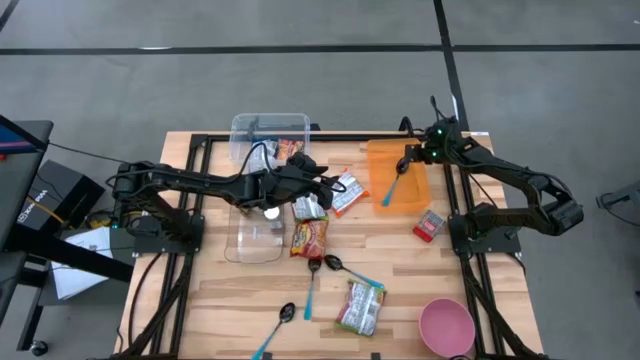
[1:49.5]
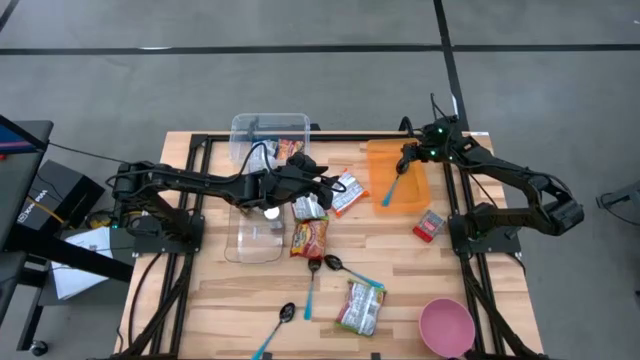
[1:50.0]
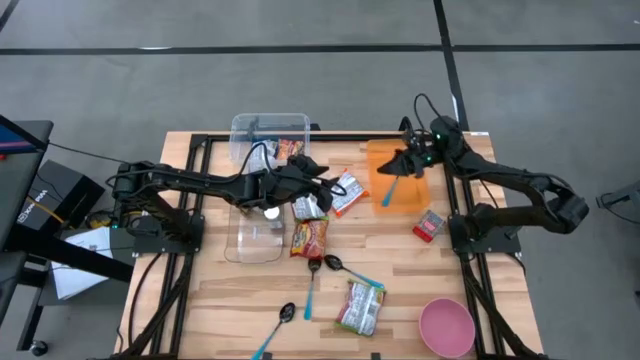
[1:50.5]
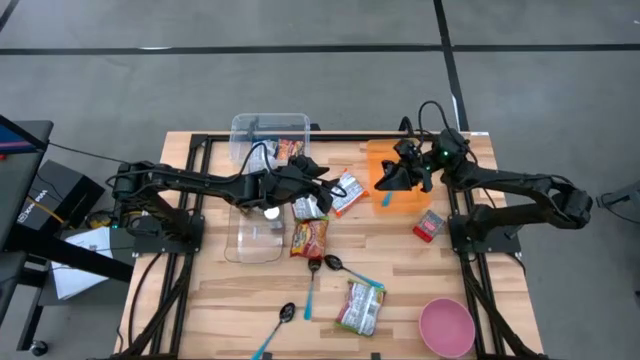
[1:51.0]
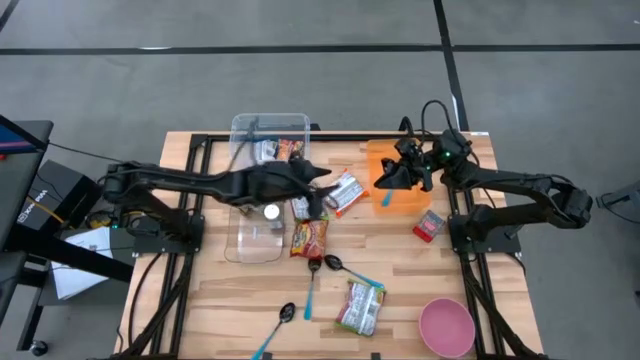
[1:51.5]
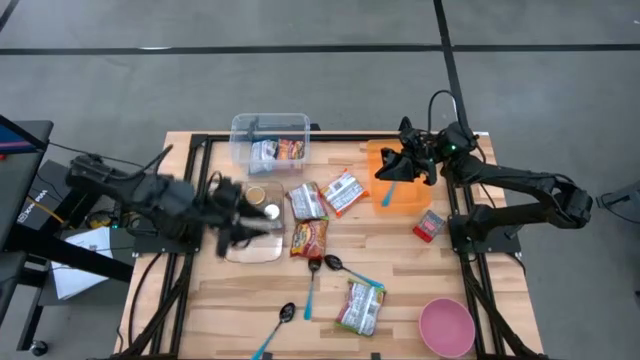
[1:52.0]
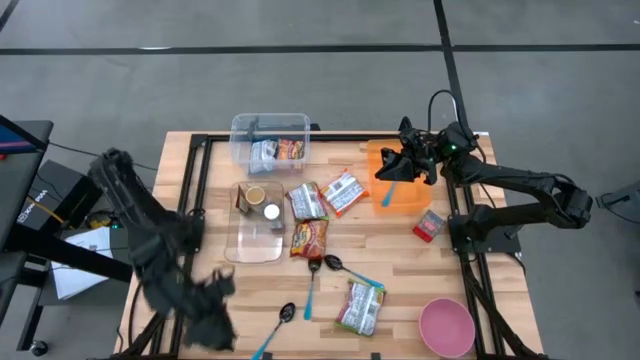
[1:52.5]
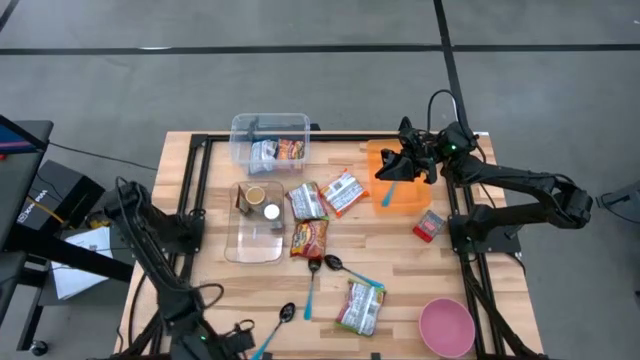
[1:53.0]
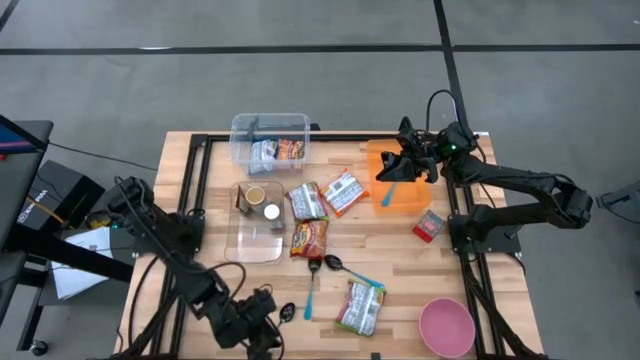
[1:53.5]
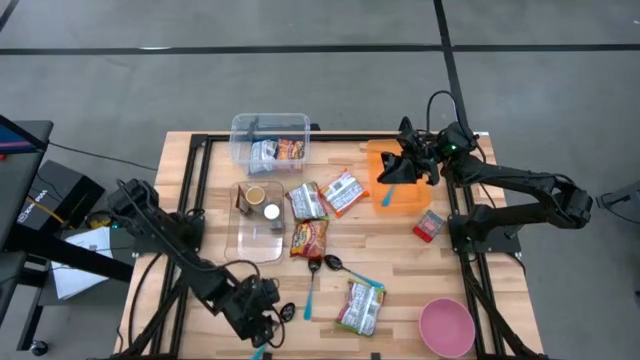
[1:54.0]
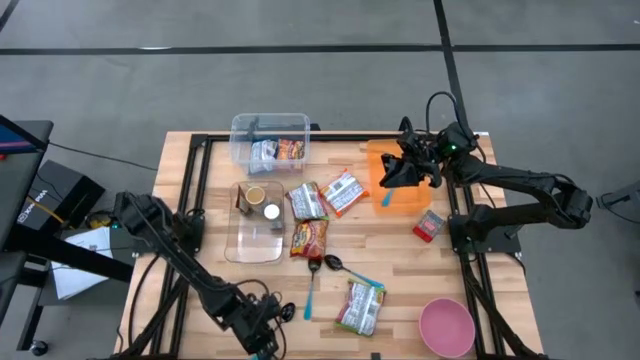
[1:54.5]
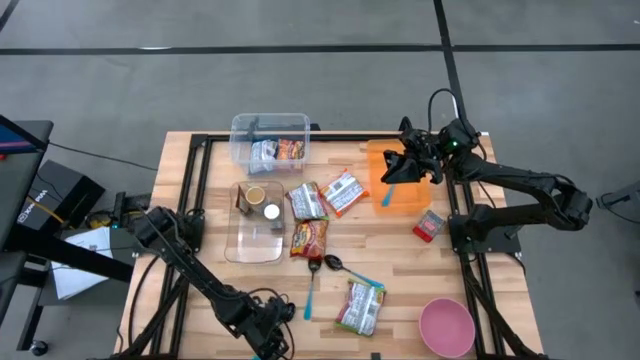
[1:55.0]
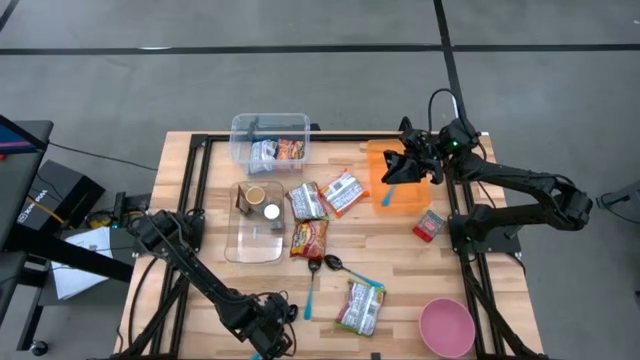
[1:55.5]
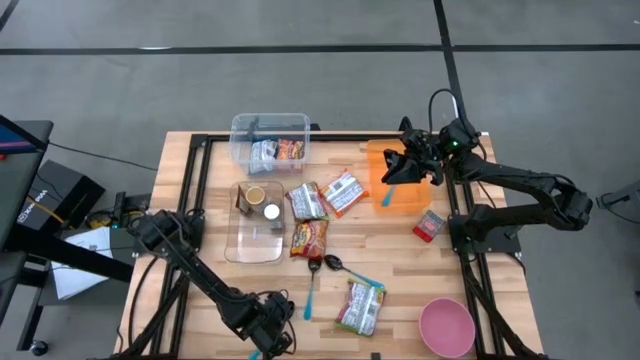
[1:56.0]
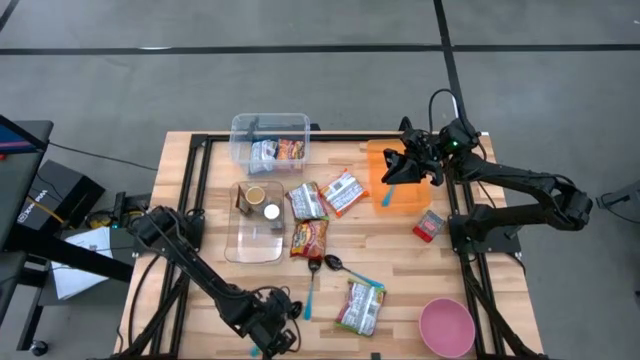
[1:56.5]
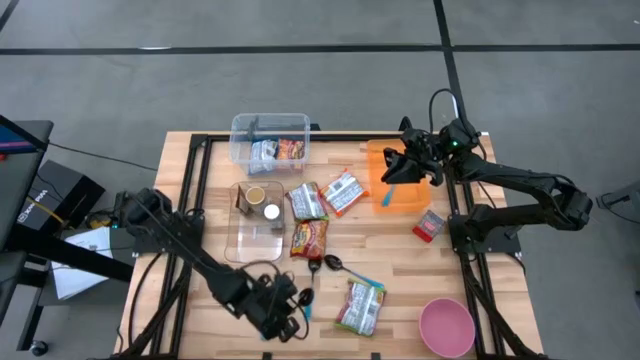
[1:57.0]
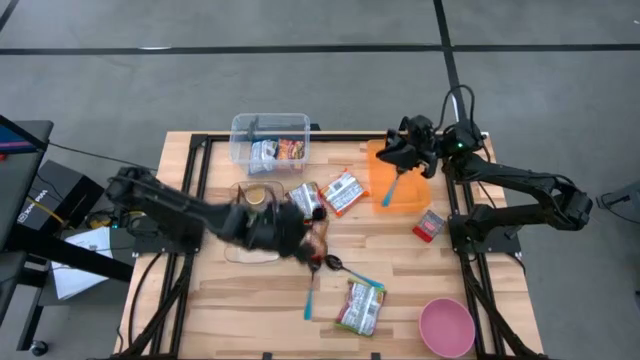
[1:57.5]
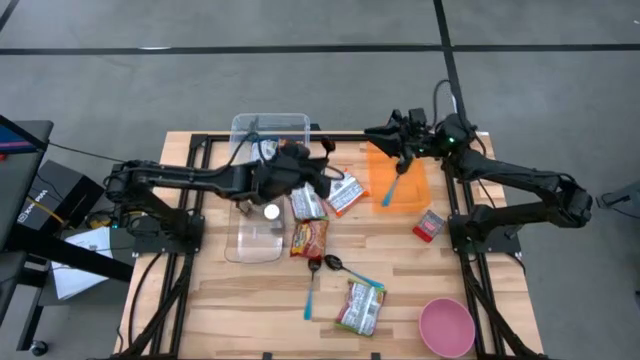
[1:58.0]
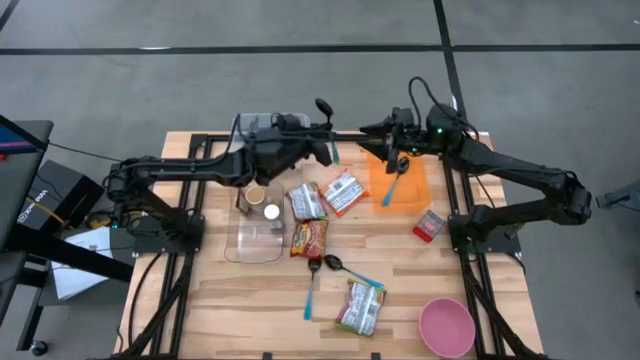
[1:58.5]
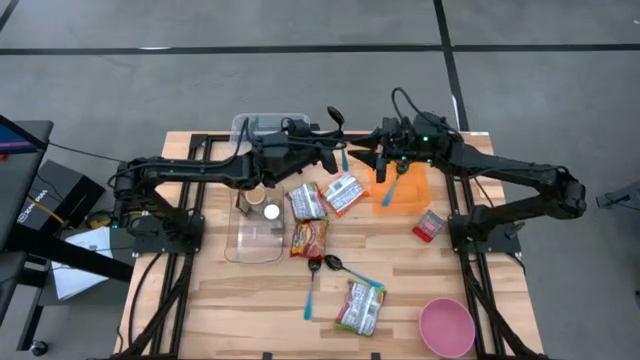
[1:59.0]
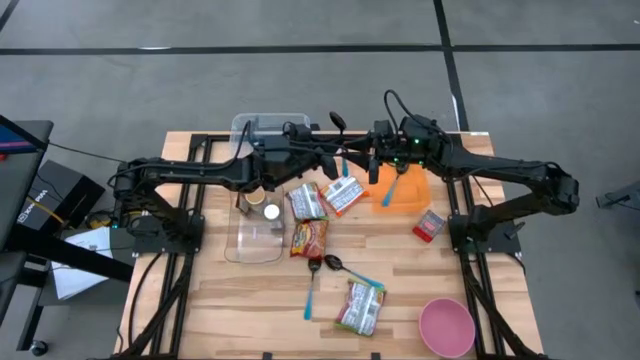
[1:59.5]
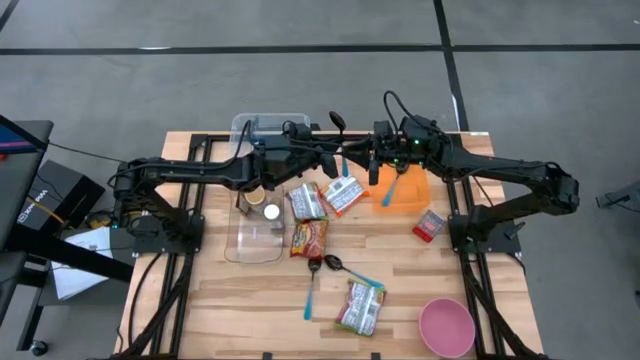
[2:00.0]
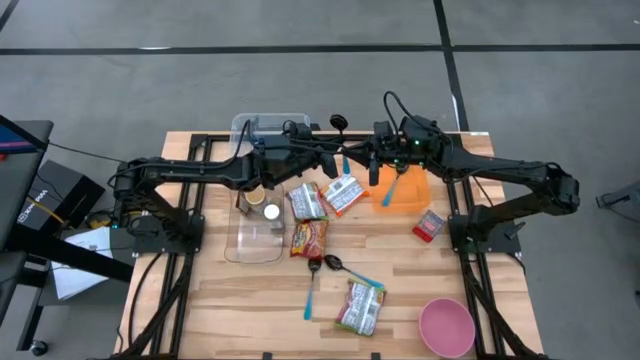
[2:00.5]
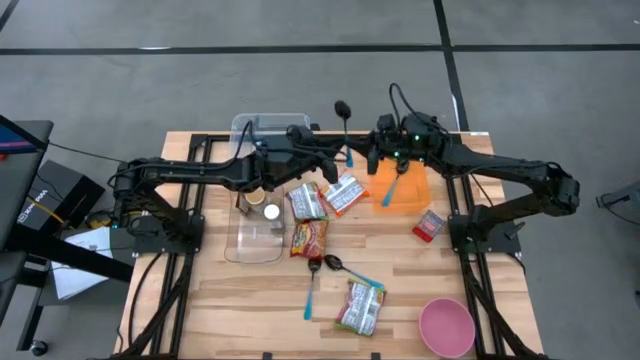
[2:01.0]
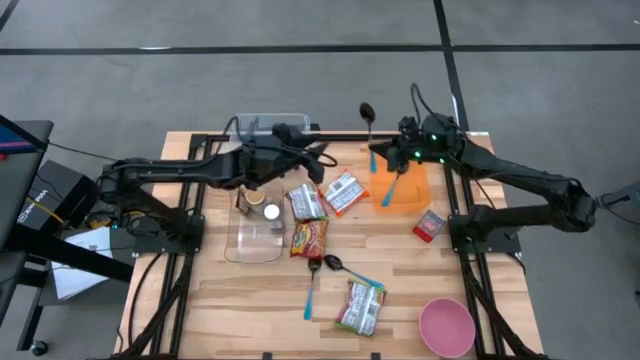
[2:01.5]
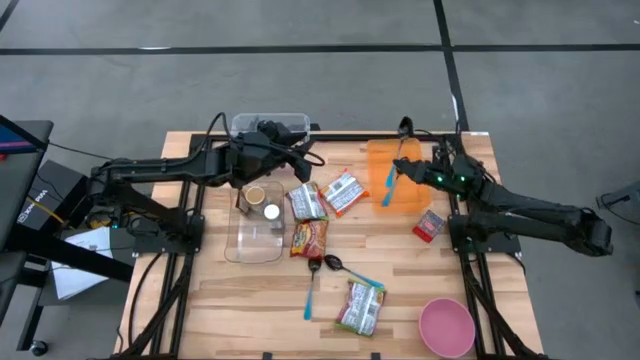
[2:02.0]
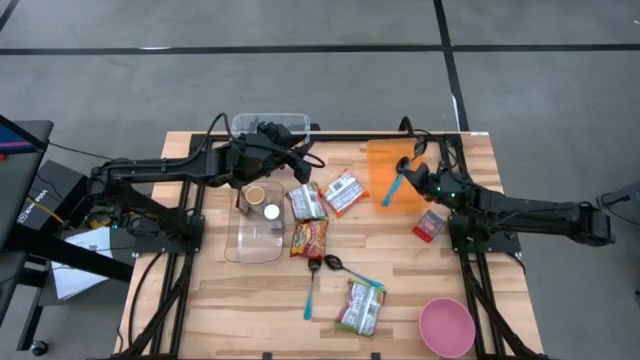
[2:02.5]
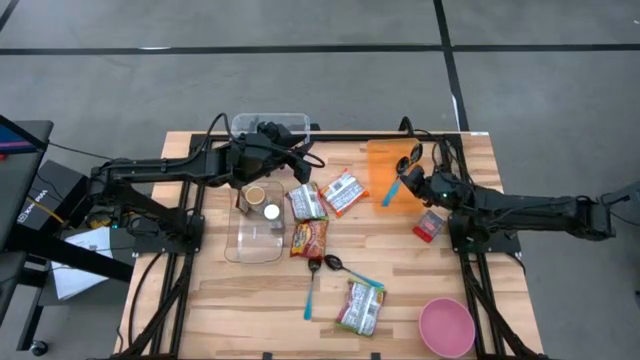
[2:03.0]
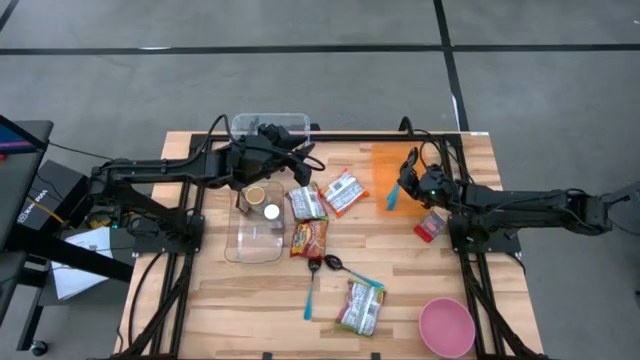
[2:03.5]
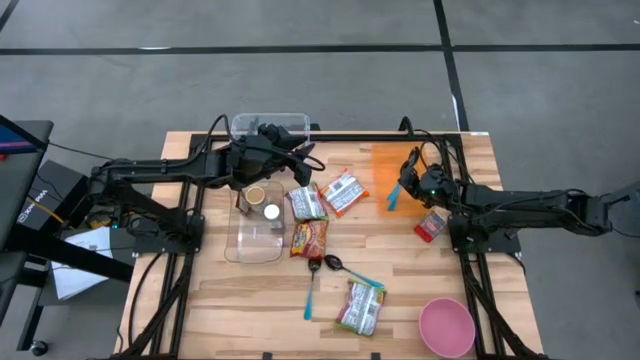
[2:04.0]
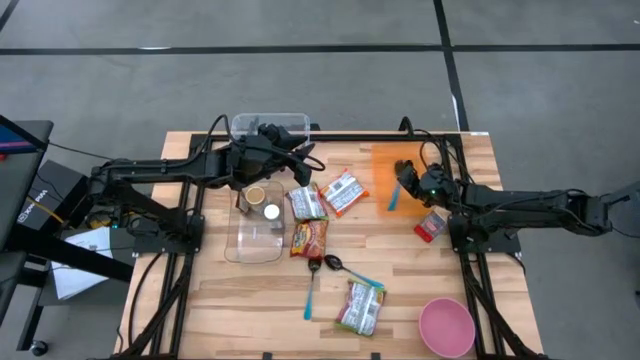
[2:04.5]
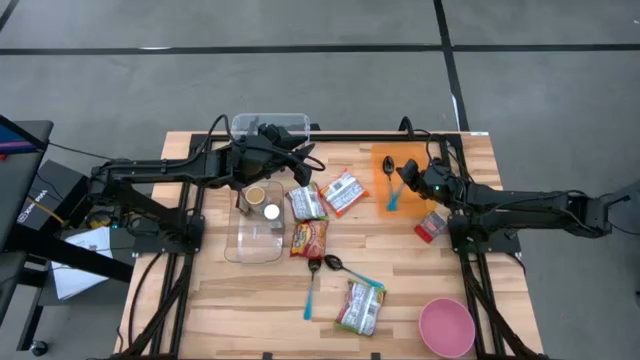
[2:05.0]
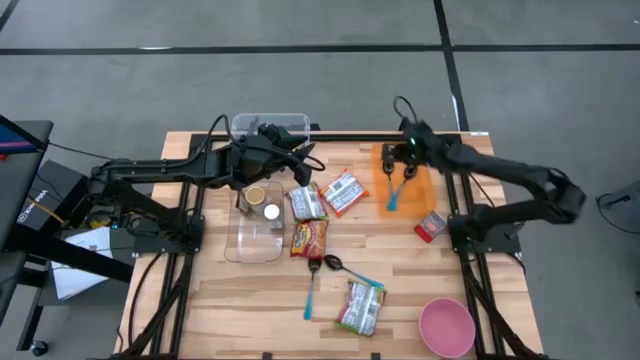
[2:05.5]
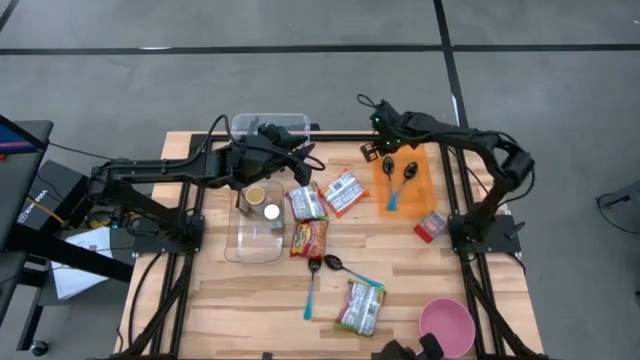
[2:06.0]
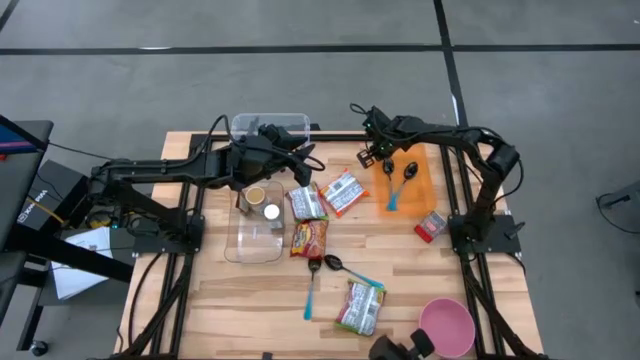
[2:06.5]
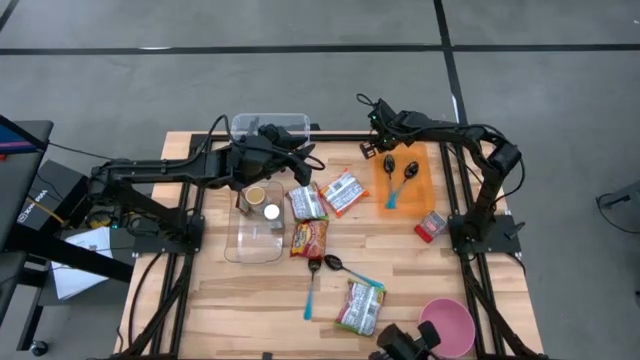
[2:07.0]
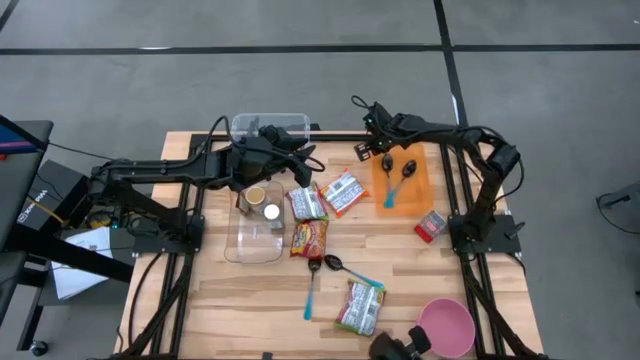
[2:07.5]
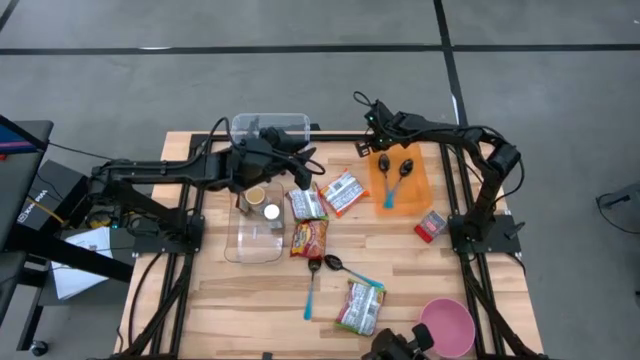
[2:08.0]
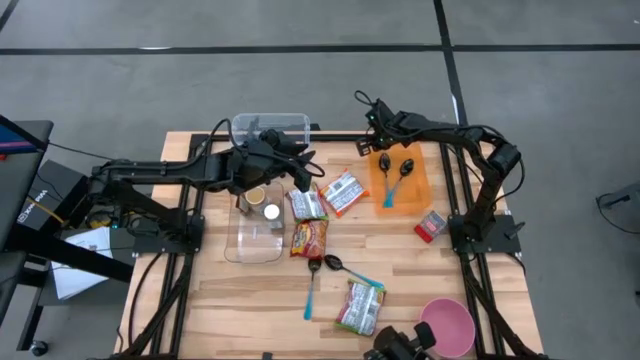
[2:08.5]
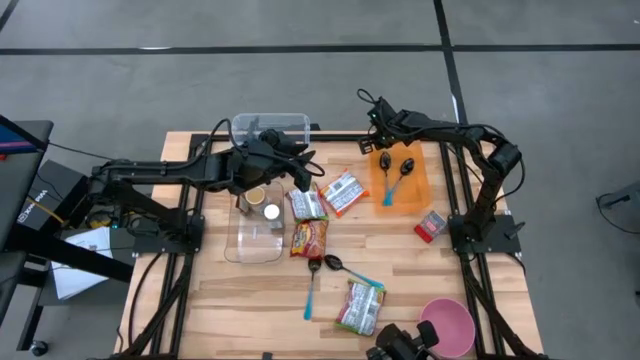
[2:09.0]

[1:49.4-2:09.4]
Task: Pick & Place Food Item
Put the blue spoon into the orange container
